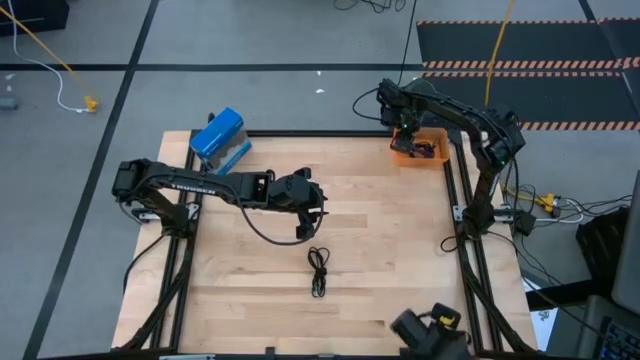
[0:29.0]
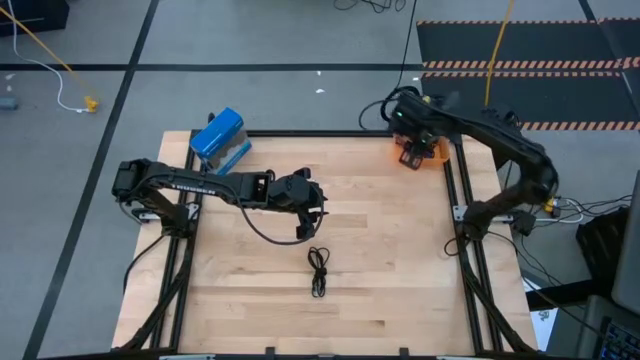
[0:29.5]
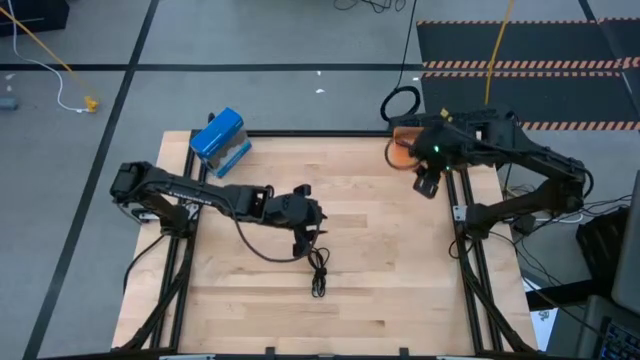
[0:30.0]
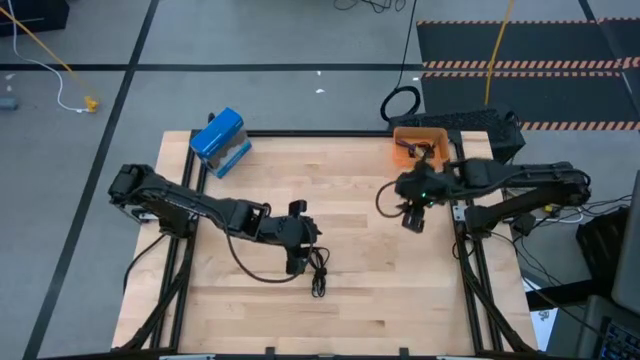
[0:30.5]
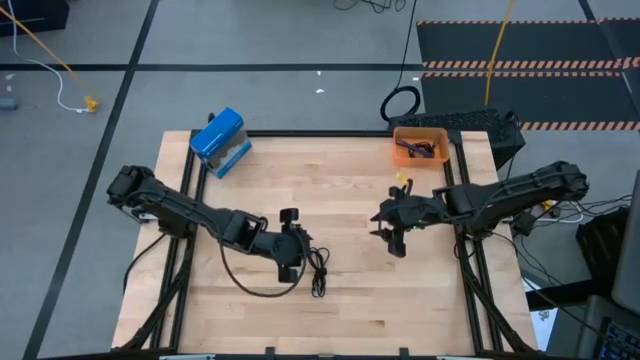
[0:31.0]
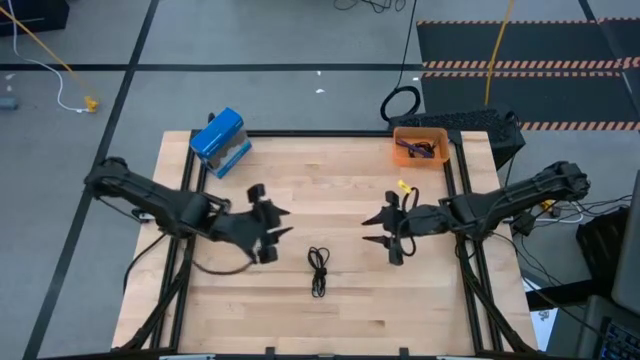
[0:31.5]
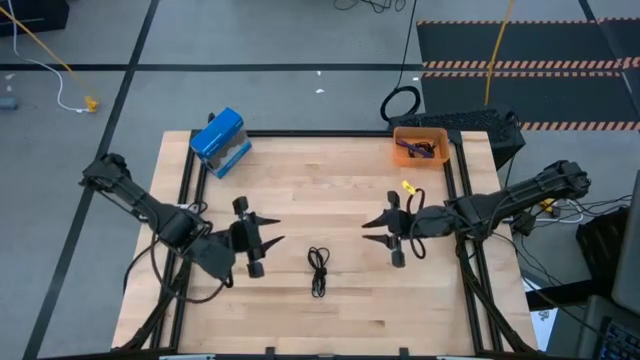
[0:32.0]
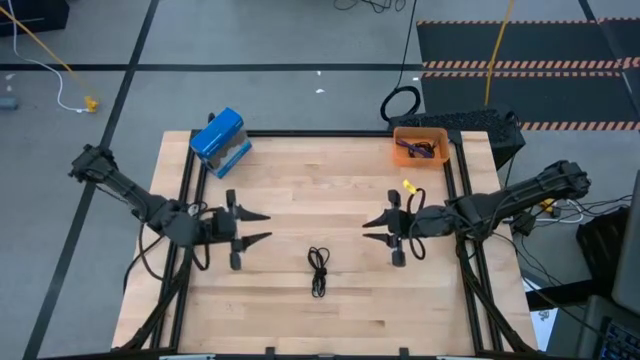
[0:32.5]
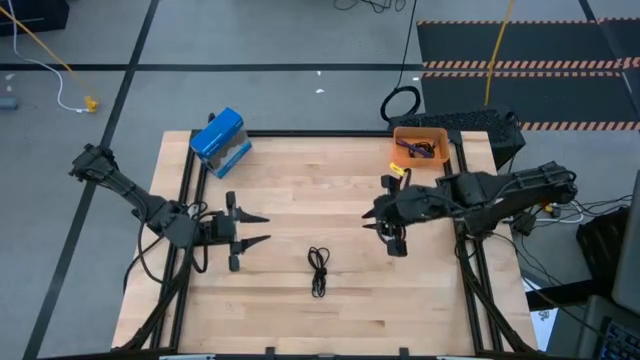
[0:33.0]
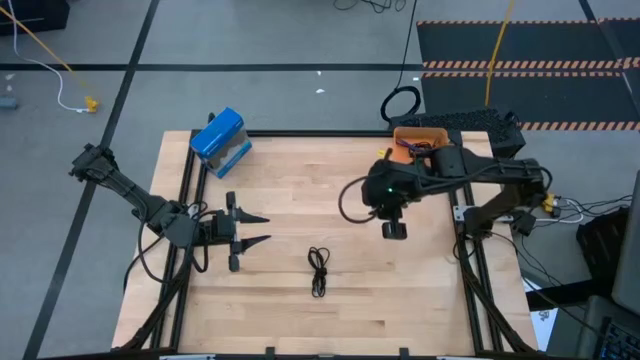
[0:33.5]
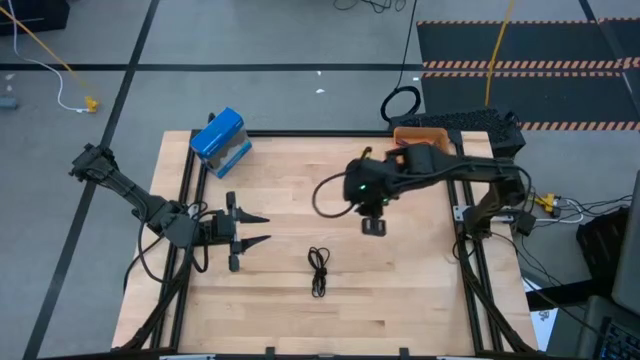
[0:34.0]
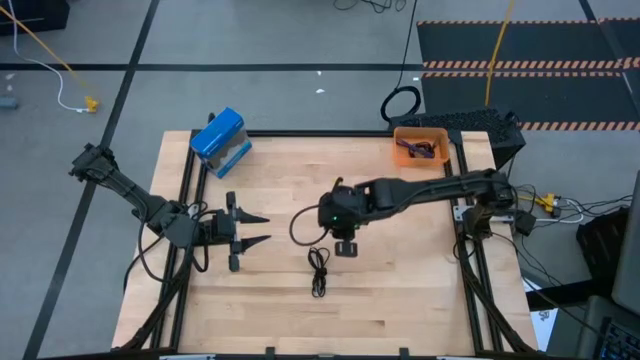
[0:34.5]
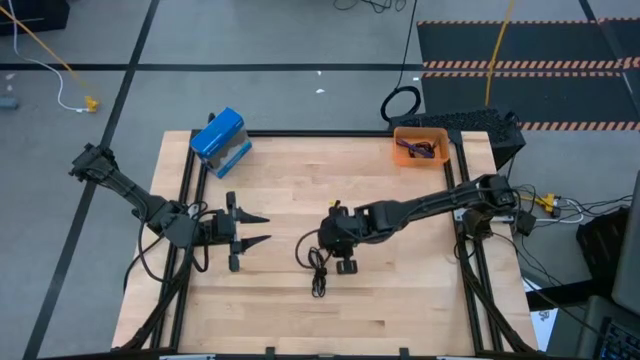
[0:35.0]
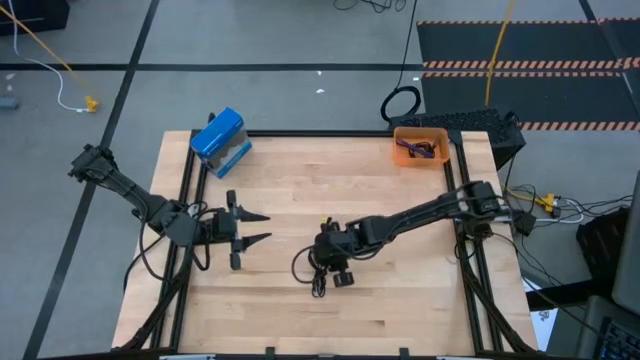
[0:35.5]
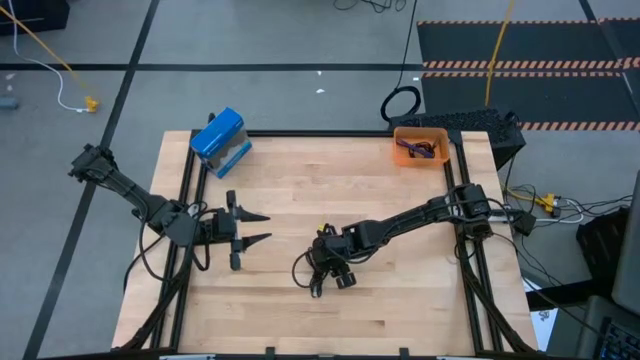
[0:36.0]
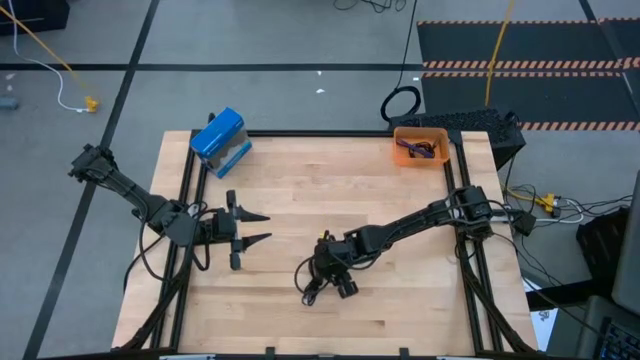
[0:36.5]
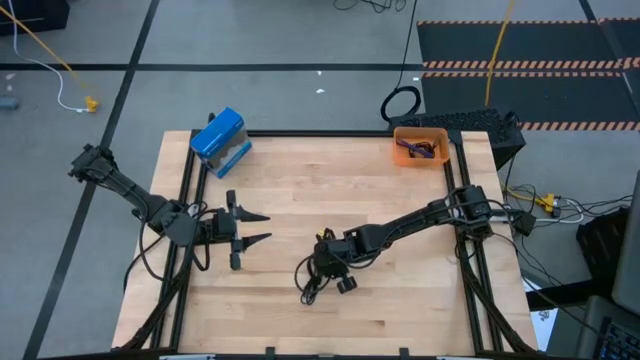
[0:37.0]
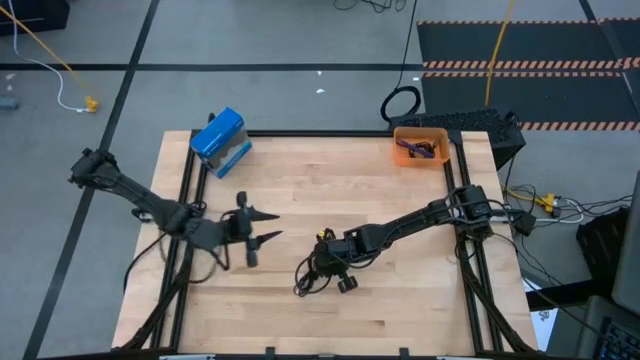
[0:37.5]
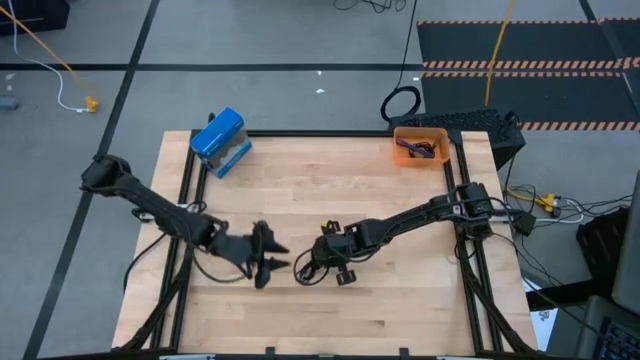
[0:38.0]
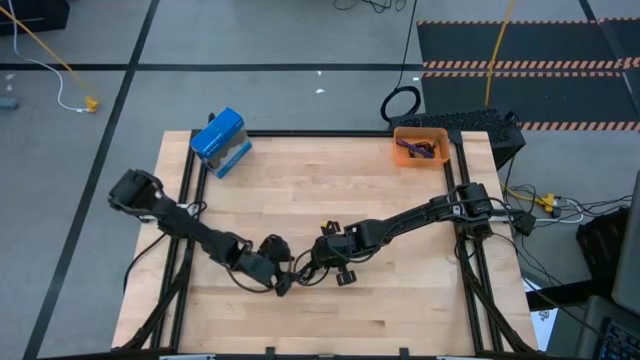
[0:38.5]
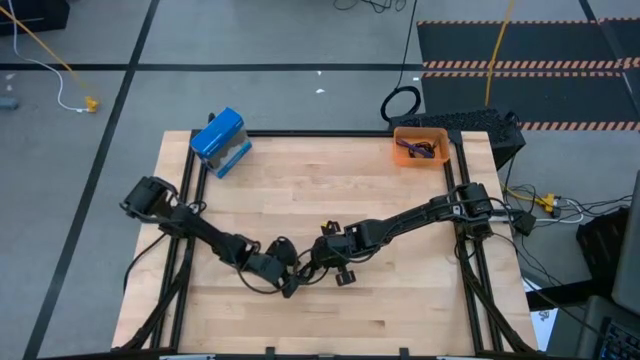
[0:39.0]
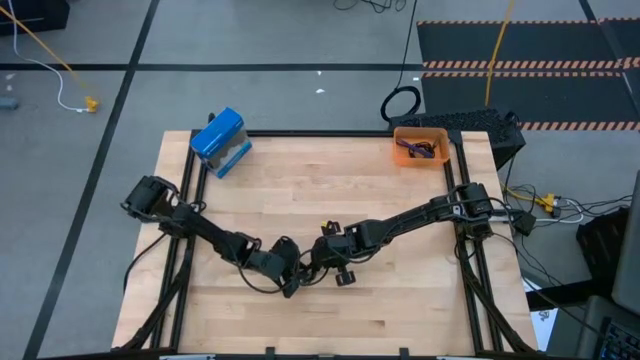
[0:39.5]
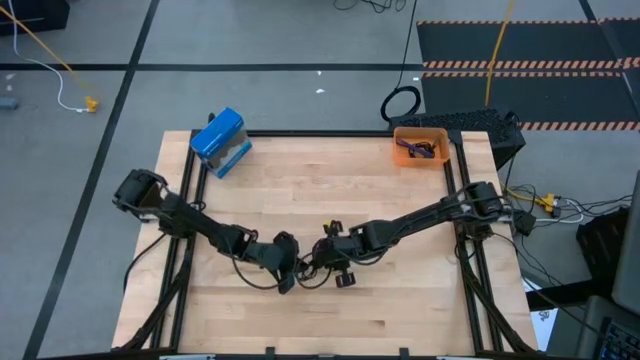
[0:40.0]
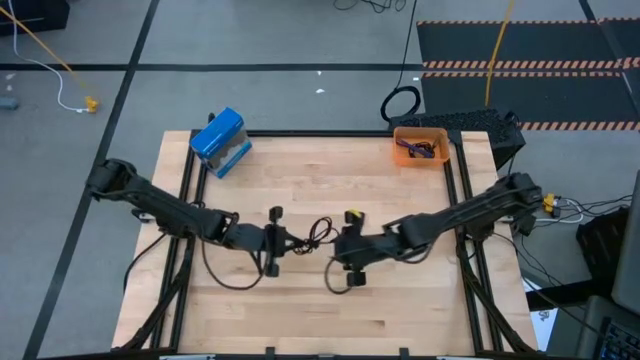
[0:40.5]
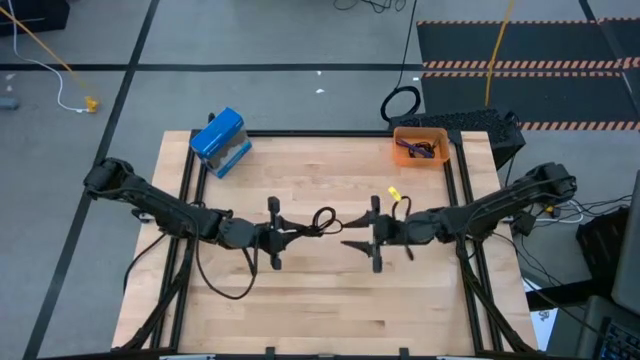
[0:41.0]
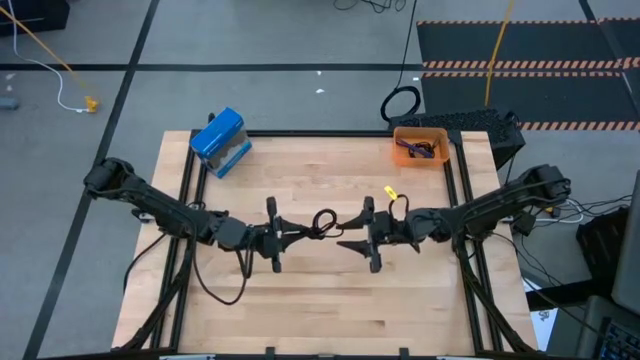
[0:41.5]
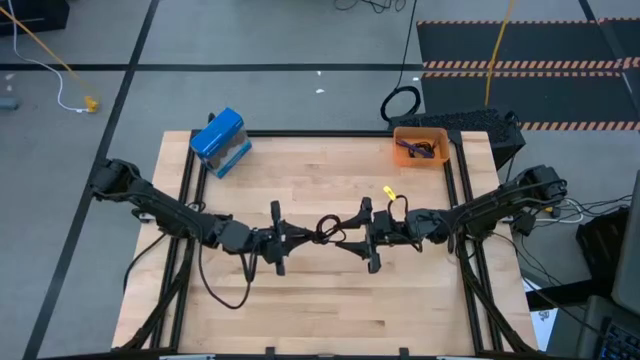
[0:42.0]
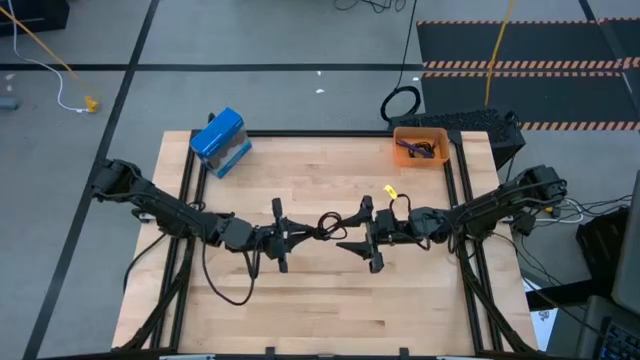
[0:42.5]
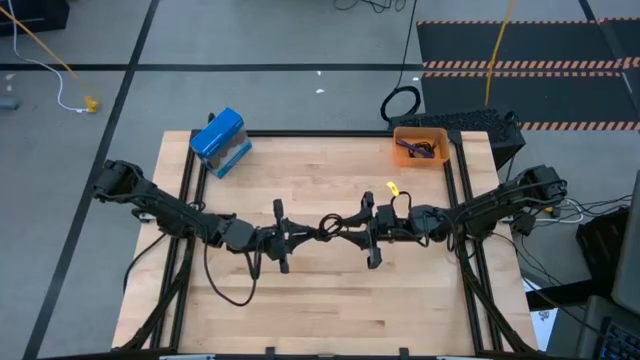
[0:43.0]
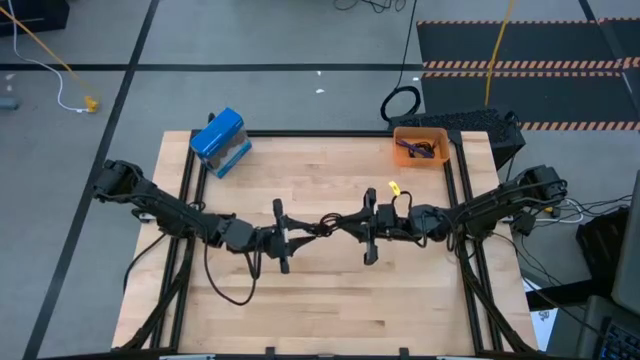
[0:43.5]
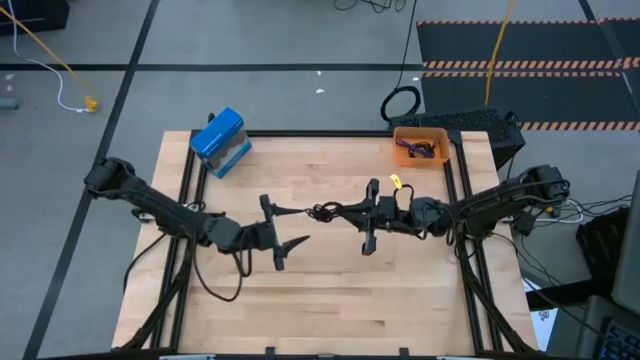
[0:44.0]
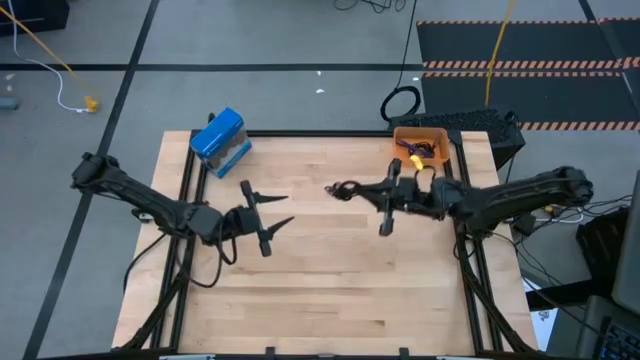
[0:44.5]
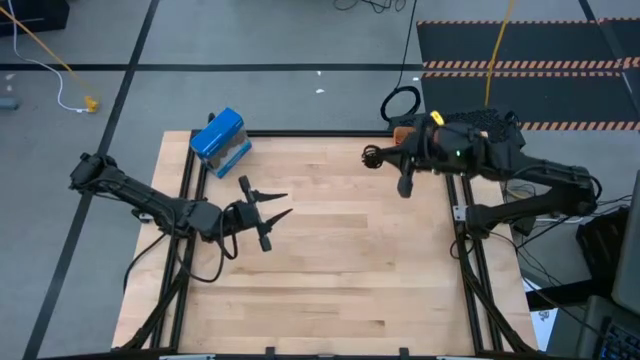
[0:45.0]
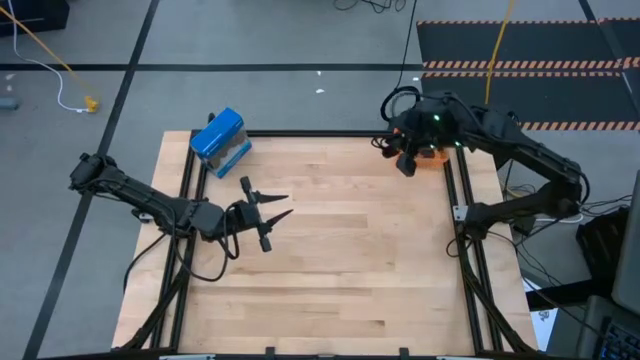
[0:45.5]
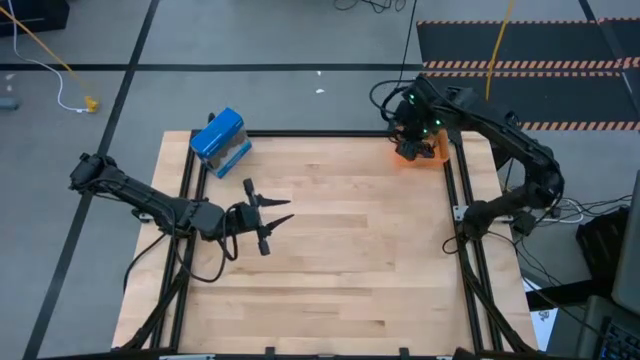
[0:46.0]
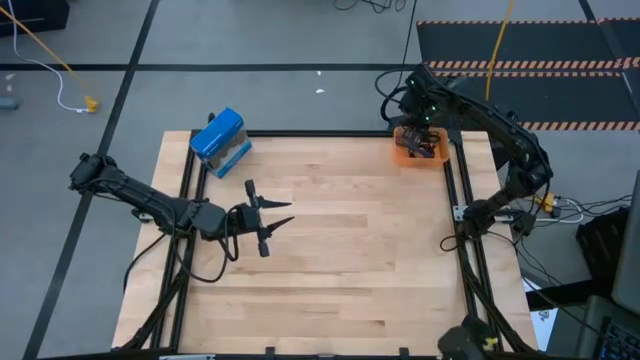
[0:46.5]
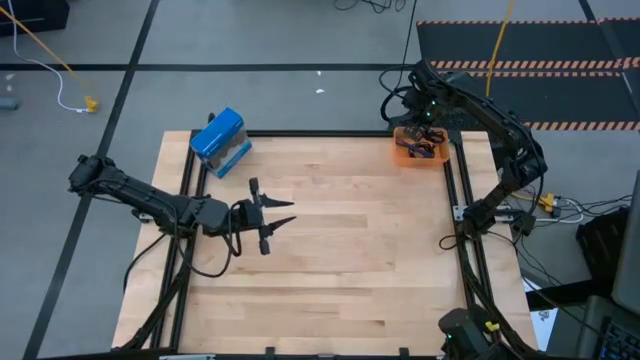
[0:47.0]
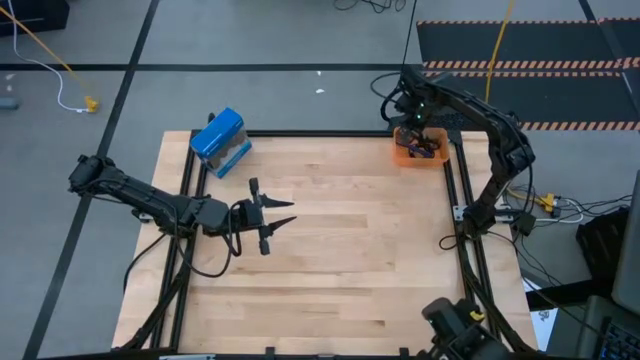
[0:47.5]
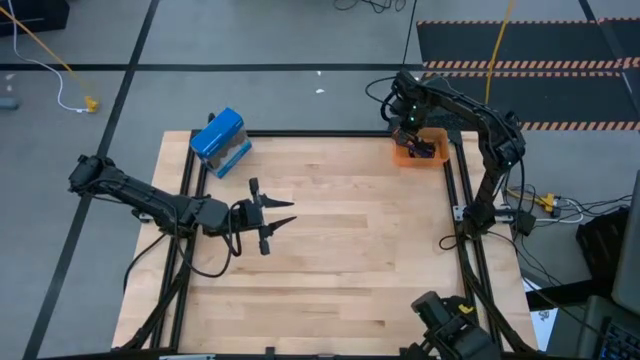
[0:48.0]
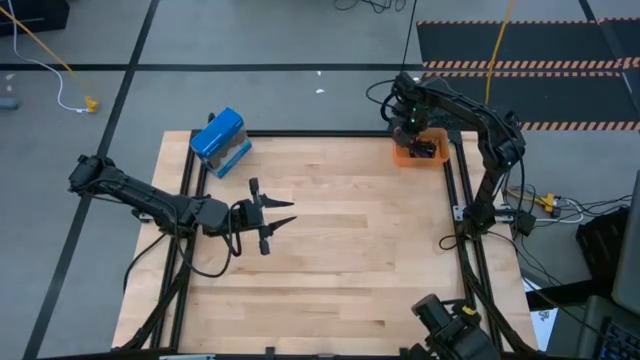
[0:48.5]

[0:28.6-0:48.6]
Task: Pick and place USB-C Cables
Put the black charger cable into the orange bin

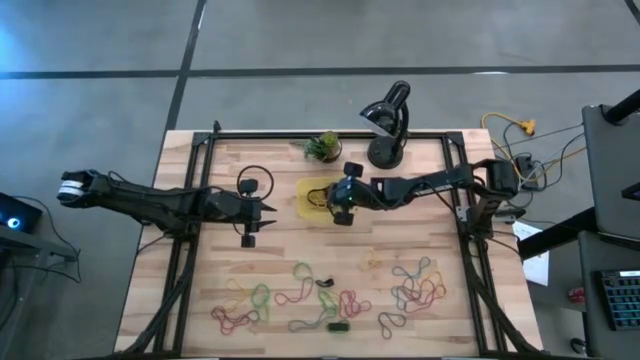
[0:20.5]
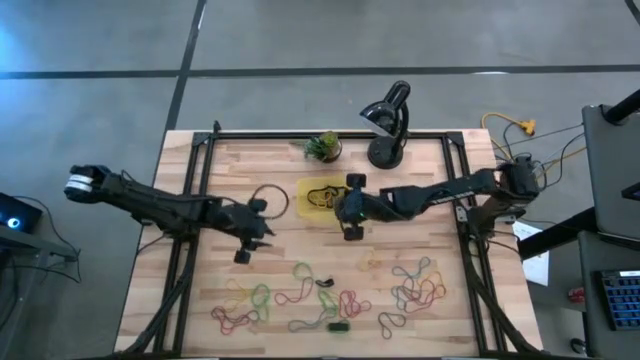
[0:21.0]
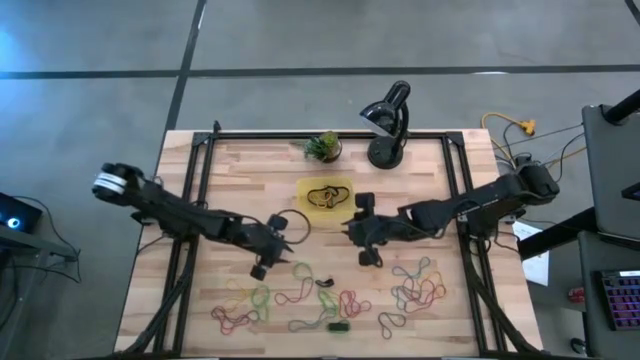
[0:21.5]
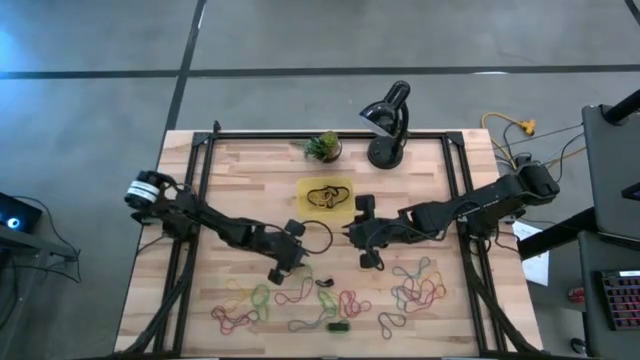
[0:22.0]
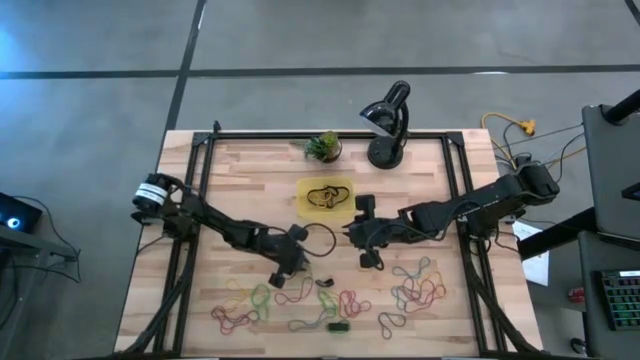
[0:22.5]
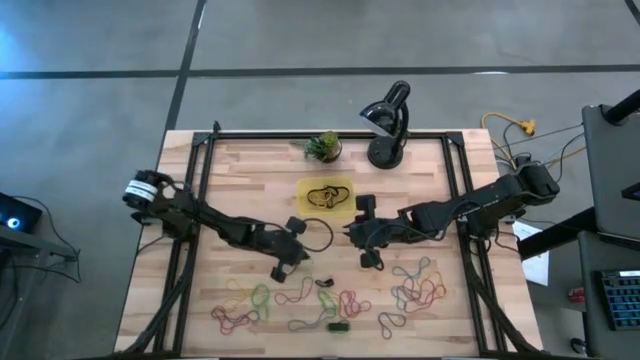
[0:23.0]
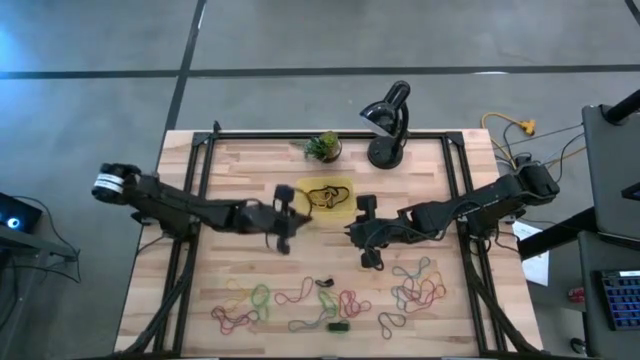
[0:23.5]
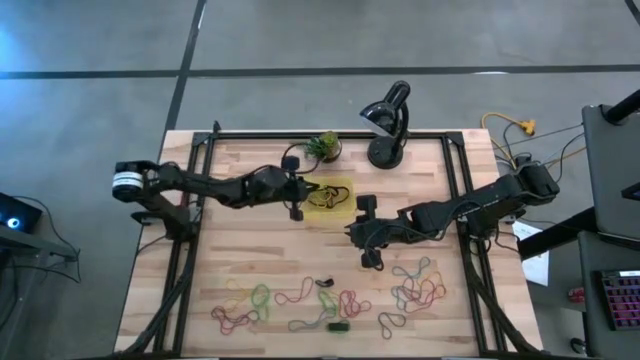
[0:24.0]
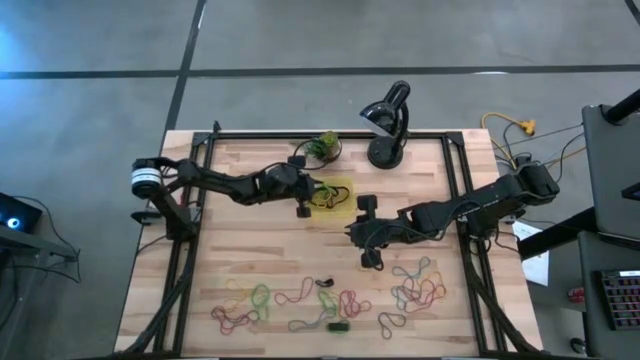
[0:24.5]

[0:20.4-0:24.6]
Task: Pick and place rubber bands into bin
Put the green rubber band in the yellow bin
